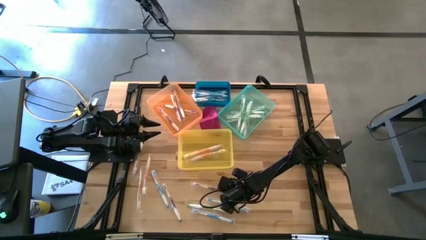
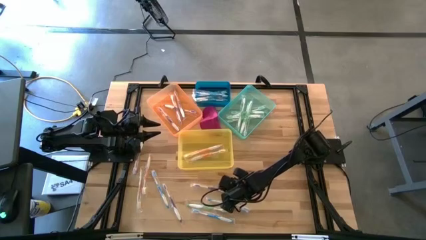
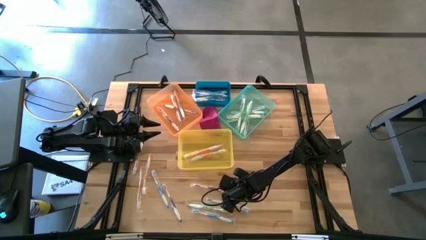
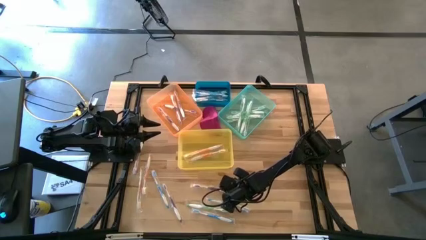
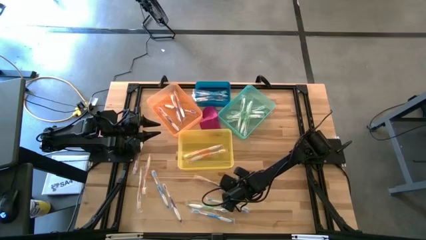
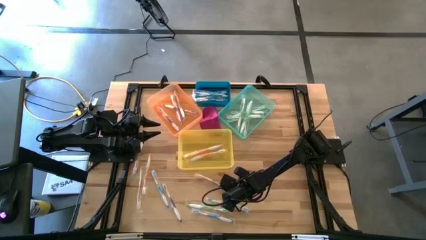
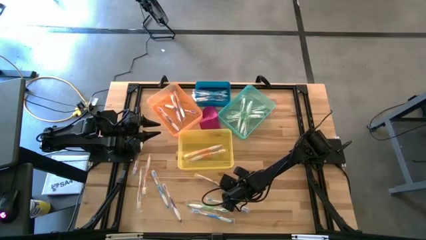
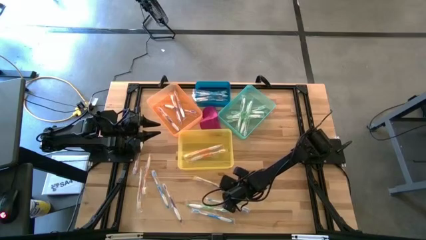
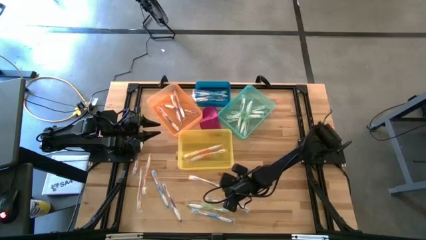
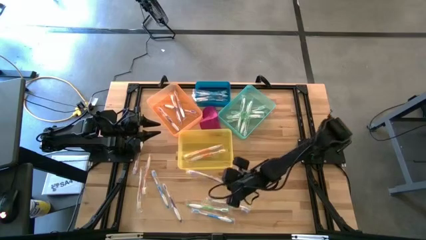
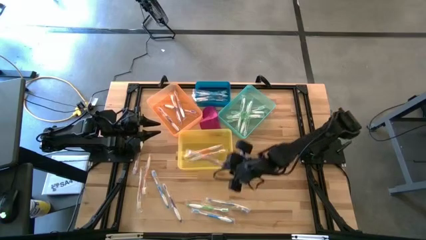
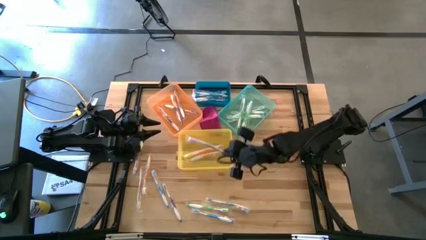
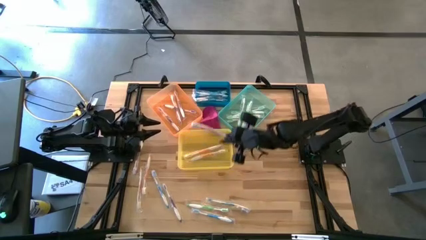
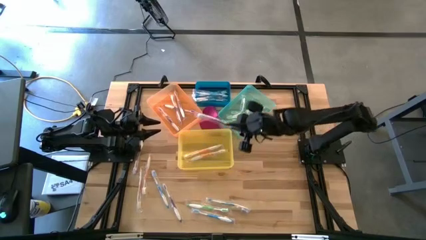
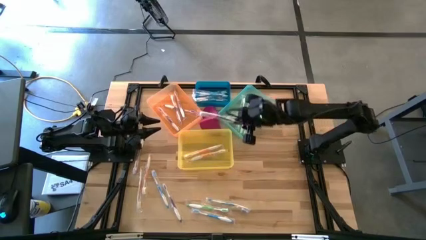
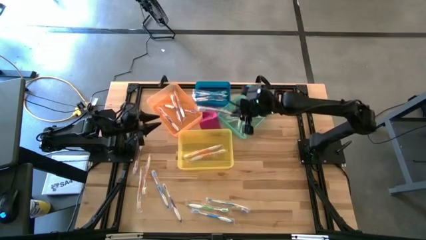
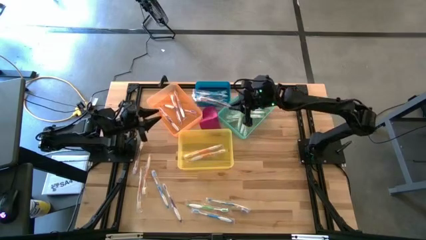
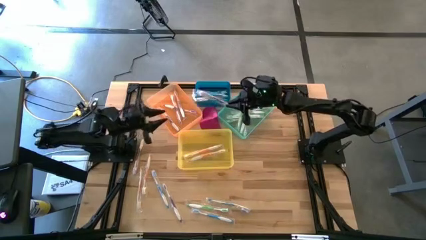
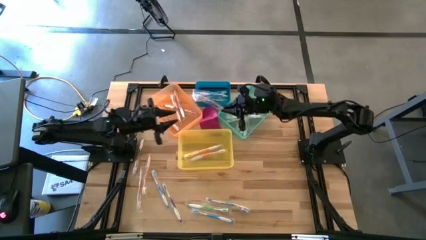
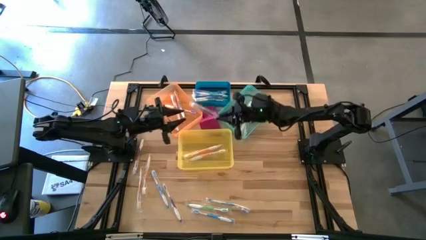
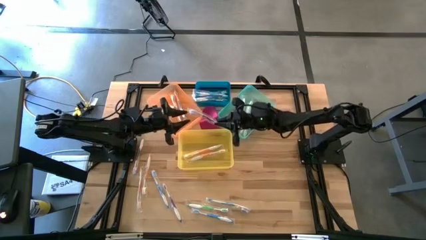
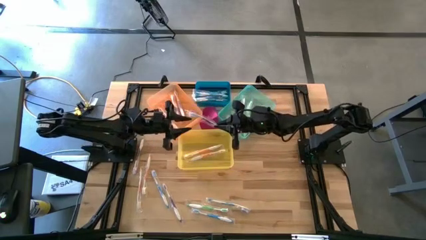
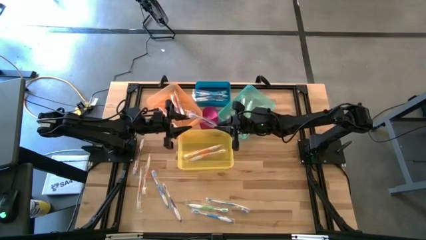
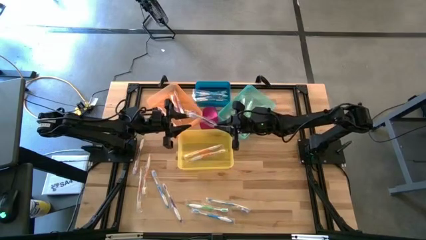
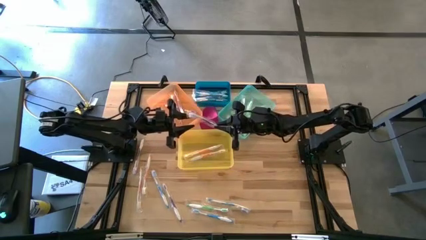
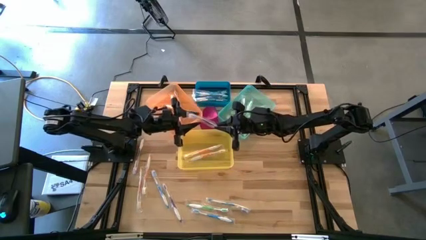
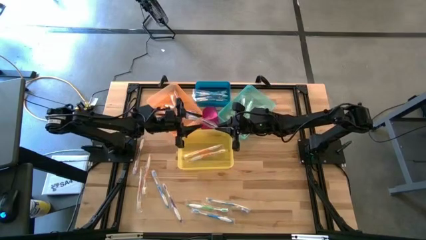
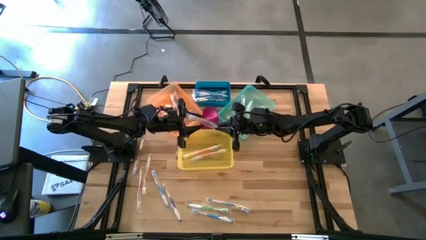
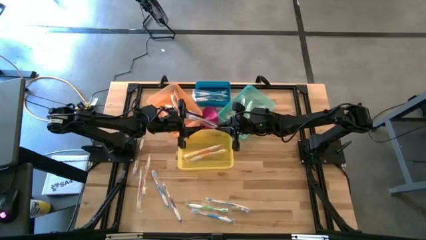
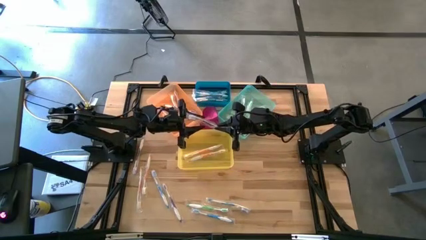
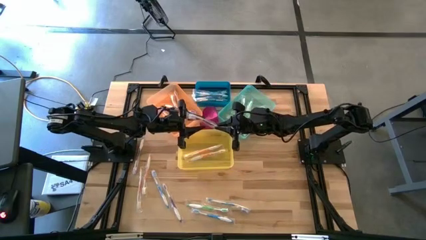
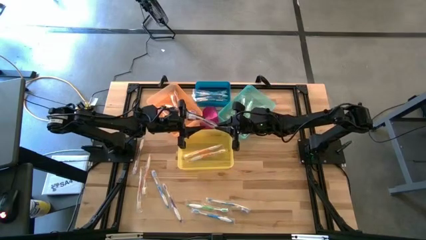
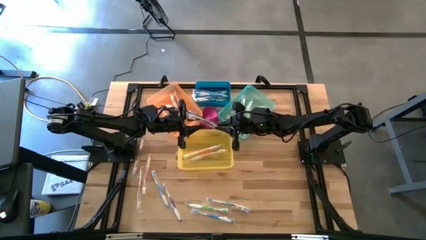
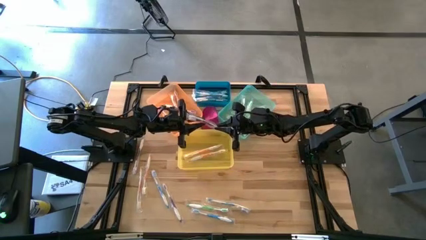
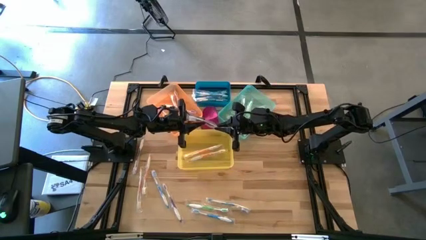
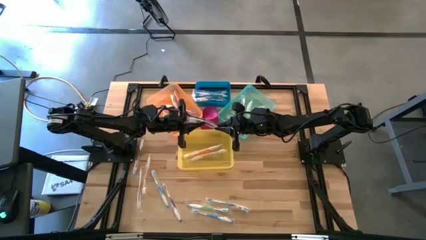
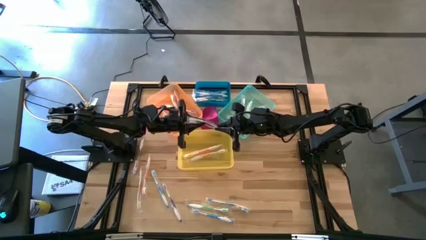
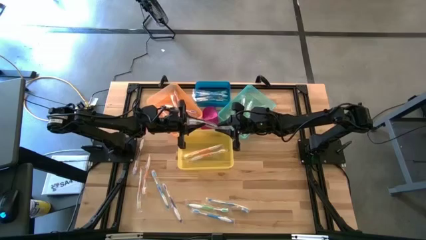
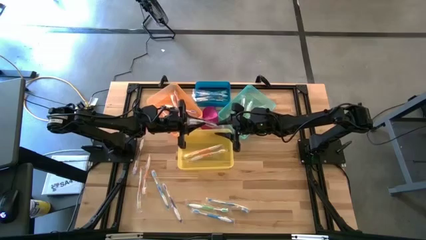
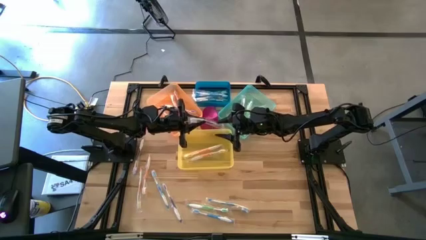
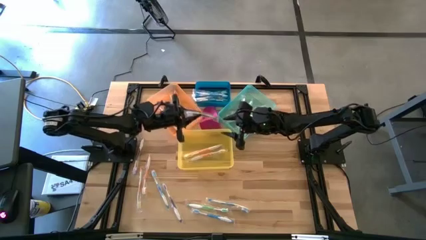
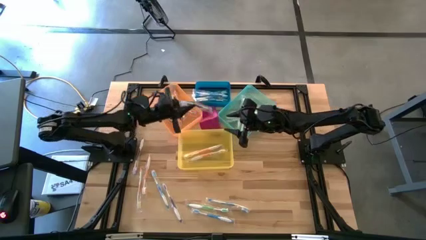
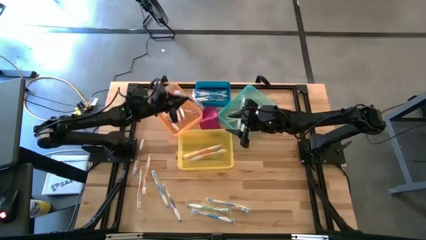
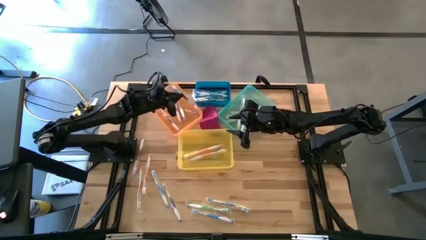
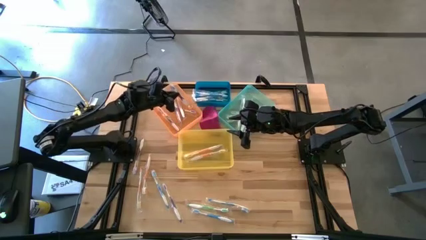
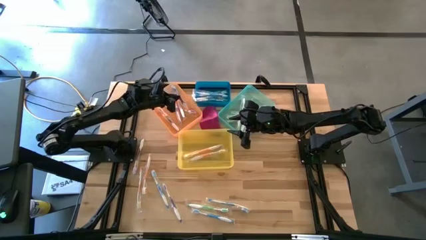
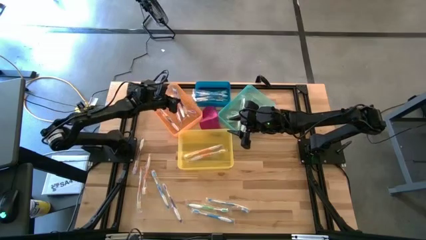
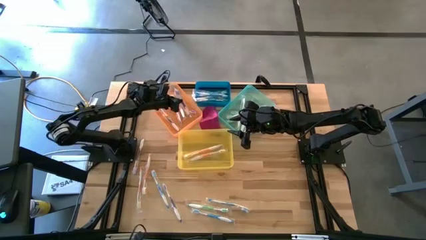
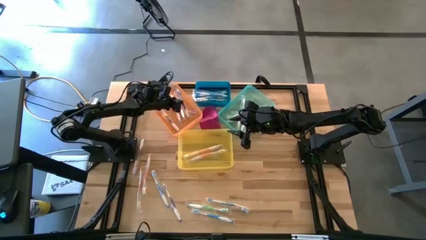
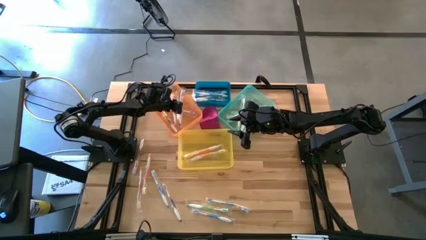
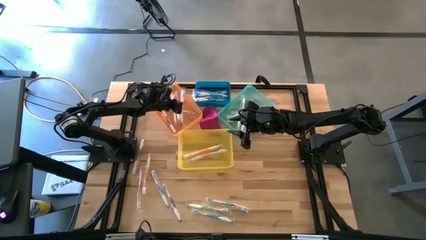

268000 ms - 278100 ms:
Task: Pick & Place Toothbrushes
Put the purple toothbrush into the orange bin
